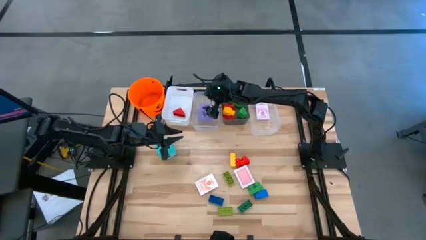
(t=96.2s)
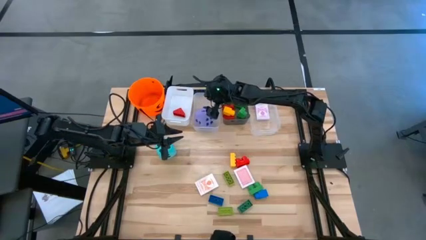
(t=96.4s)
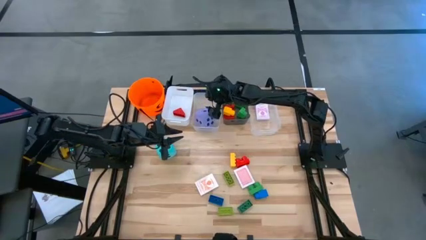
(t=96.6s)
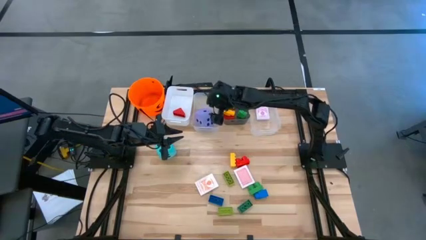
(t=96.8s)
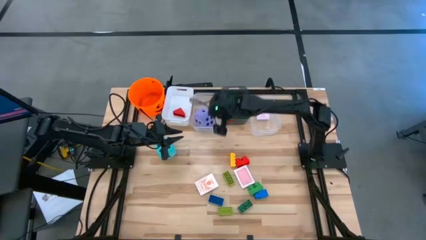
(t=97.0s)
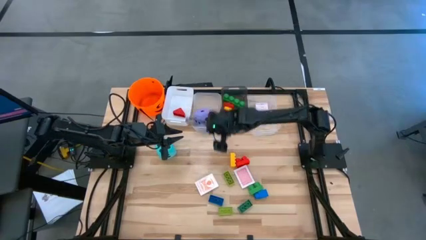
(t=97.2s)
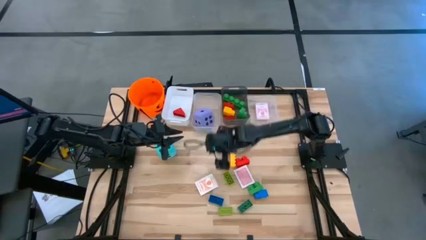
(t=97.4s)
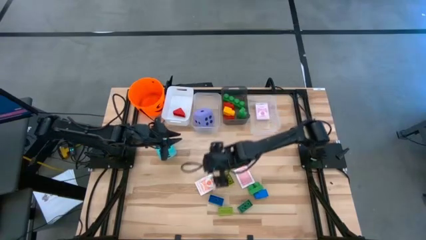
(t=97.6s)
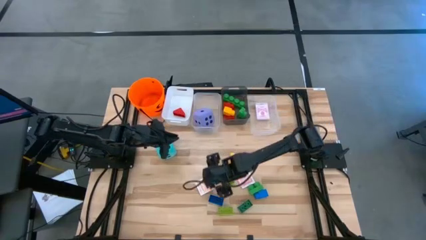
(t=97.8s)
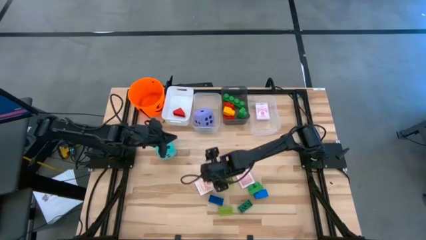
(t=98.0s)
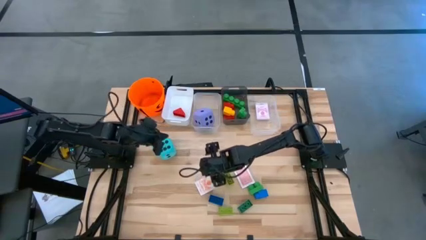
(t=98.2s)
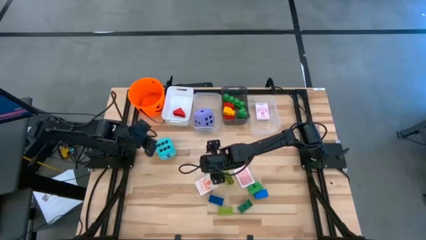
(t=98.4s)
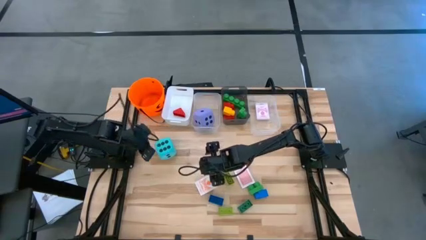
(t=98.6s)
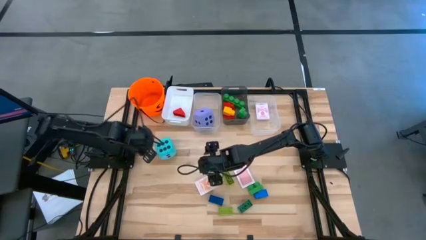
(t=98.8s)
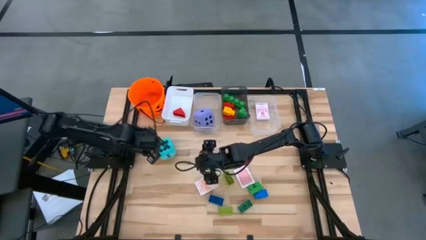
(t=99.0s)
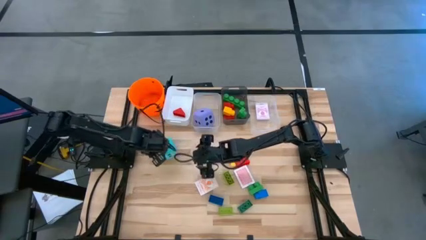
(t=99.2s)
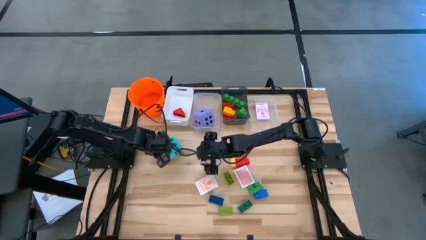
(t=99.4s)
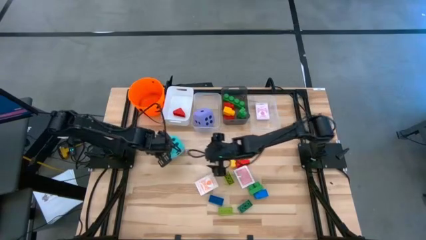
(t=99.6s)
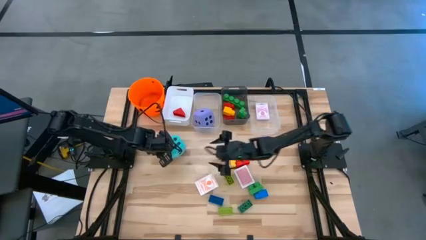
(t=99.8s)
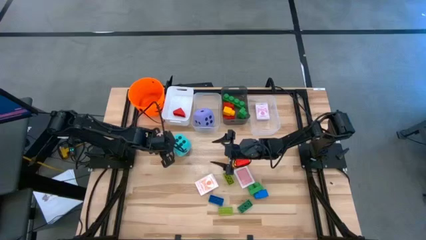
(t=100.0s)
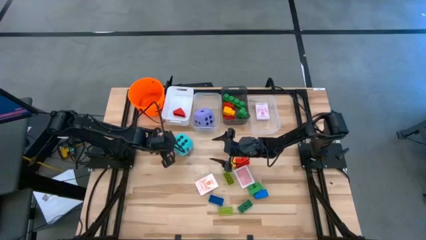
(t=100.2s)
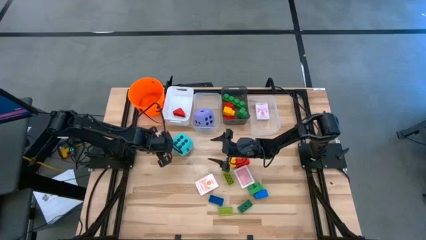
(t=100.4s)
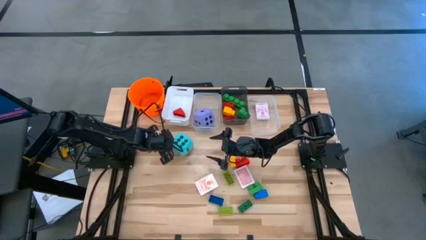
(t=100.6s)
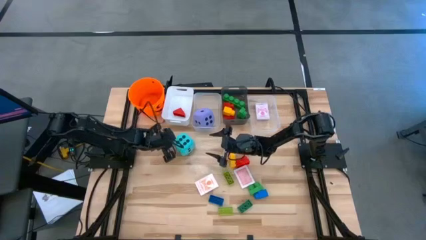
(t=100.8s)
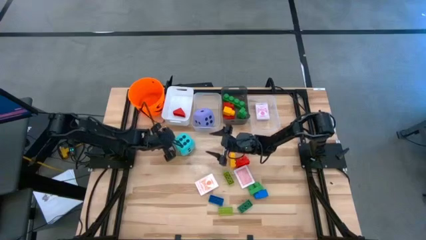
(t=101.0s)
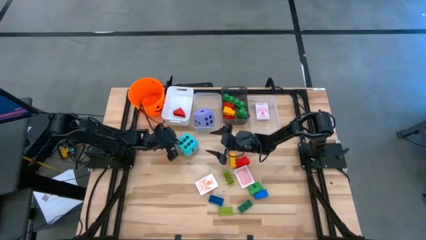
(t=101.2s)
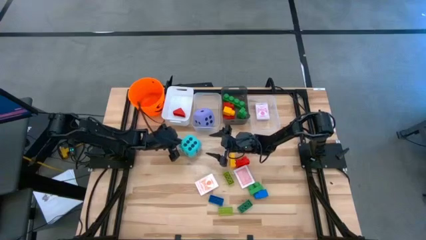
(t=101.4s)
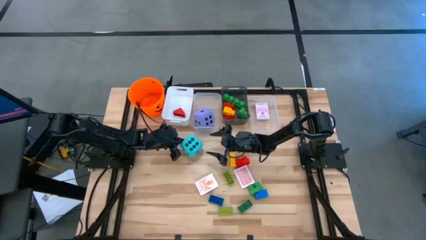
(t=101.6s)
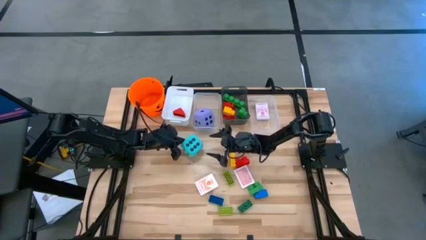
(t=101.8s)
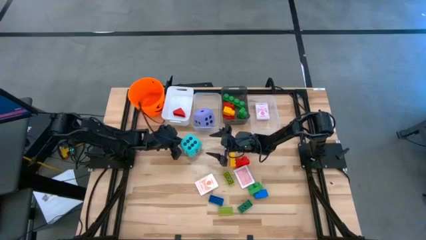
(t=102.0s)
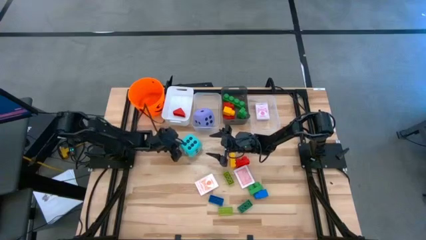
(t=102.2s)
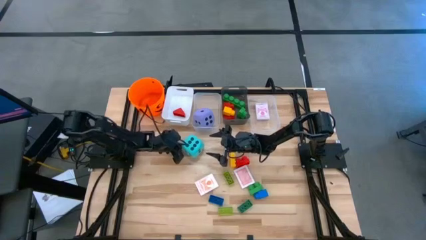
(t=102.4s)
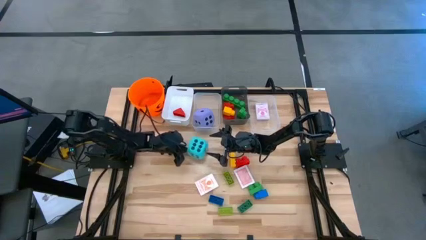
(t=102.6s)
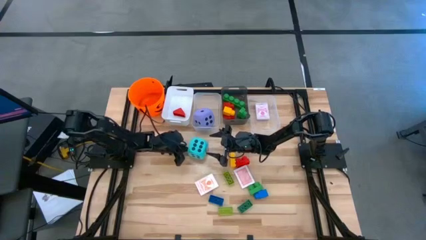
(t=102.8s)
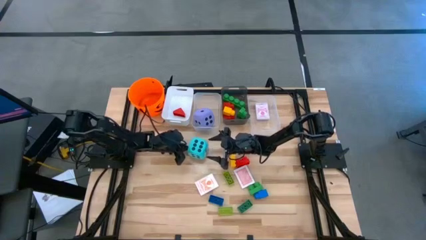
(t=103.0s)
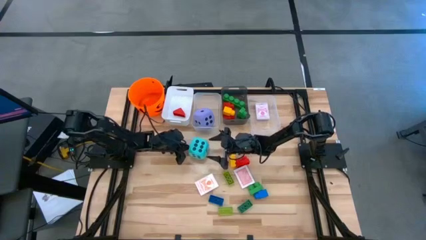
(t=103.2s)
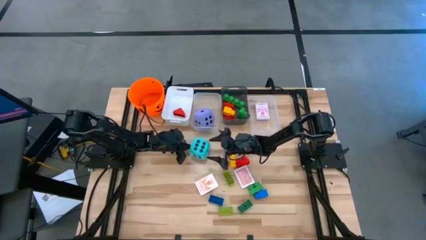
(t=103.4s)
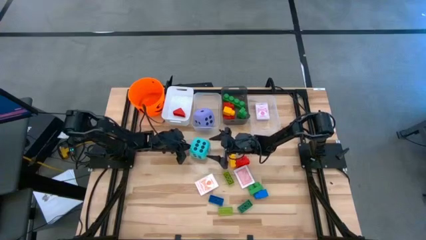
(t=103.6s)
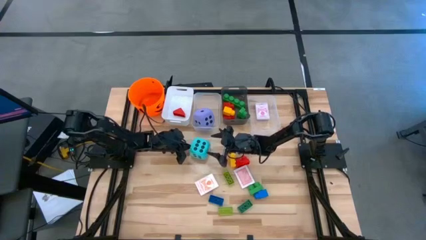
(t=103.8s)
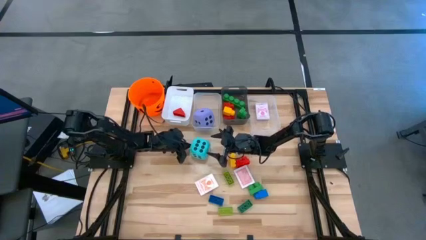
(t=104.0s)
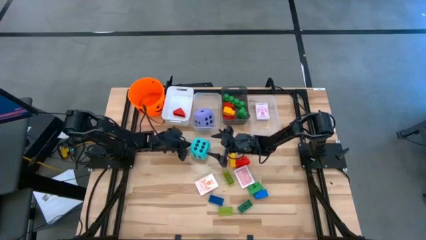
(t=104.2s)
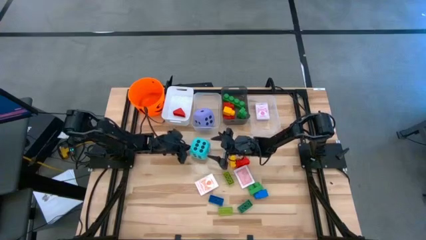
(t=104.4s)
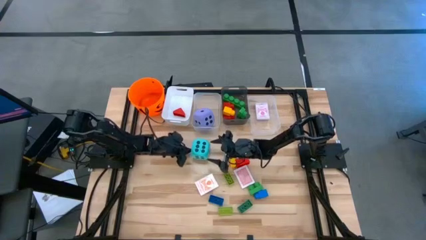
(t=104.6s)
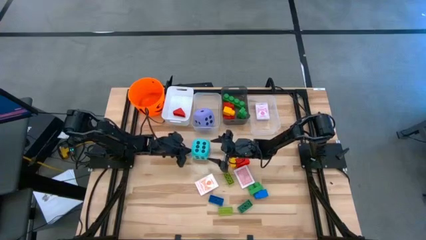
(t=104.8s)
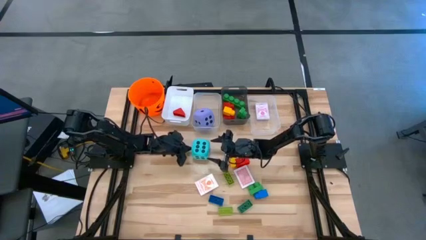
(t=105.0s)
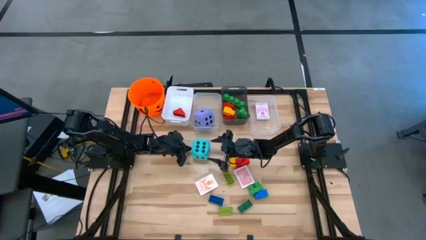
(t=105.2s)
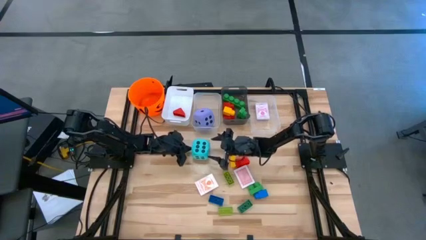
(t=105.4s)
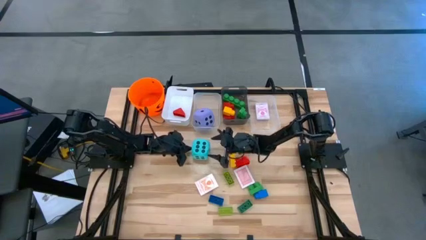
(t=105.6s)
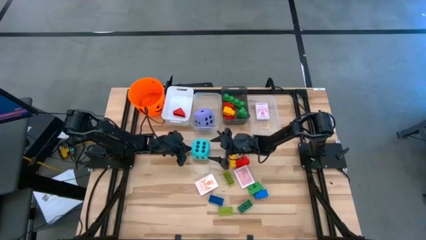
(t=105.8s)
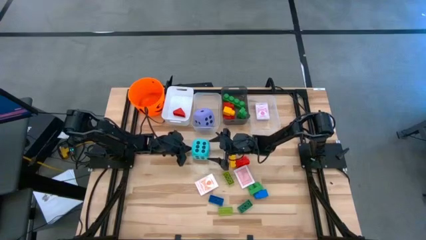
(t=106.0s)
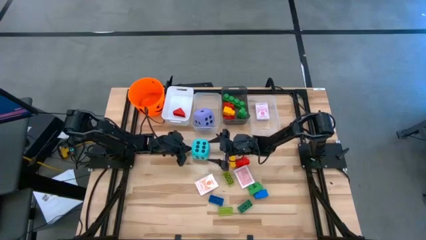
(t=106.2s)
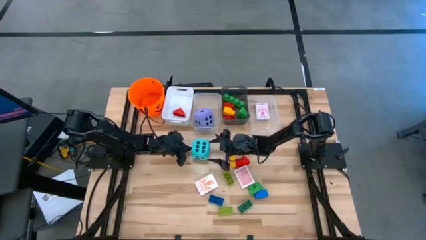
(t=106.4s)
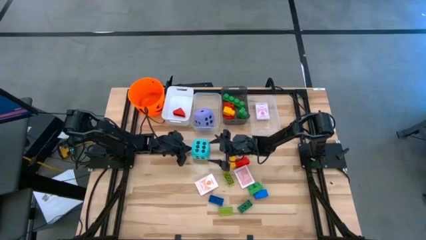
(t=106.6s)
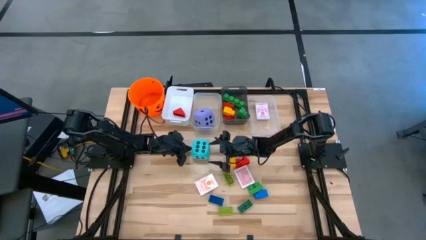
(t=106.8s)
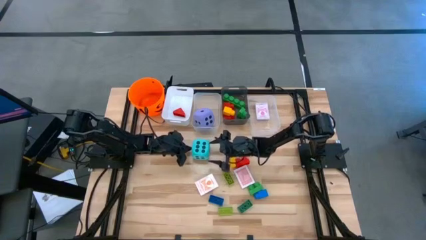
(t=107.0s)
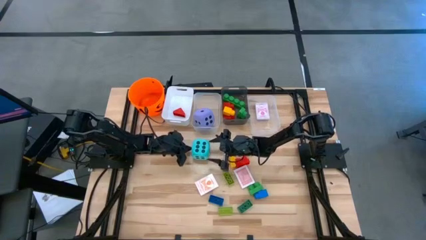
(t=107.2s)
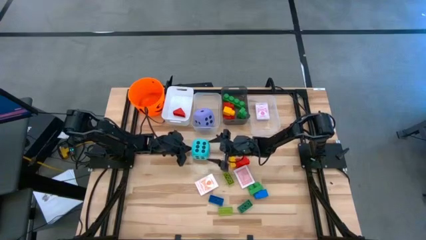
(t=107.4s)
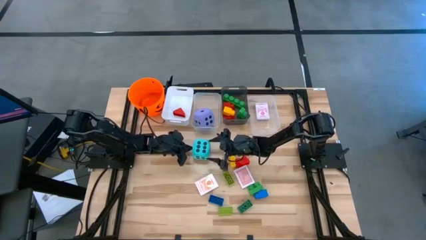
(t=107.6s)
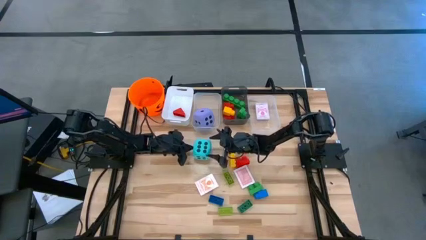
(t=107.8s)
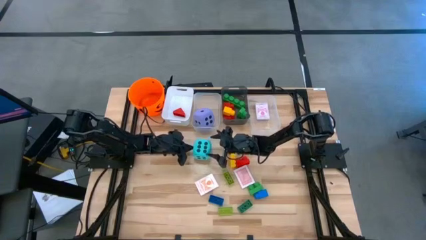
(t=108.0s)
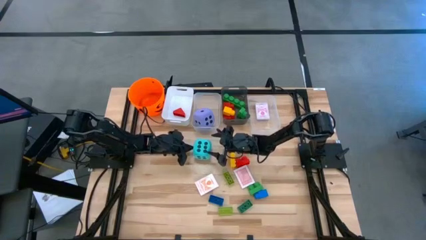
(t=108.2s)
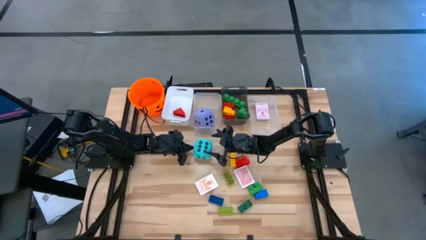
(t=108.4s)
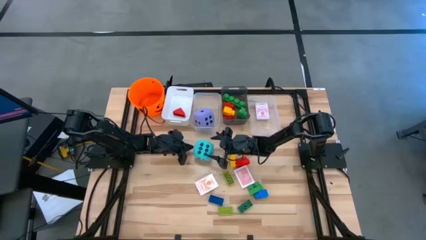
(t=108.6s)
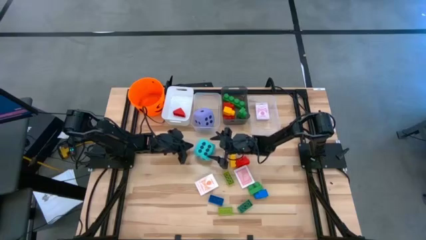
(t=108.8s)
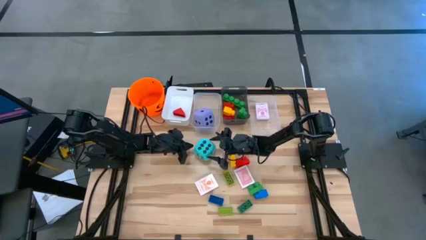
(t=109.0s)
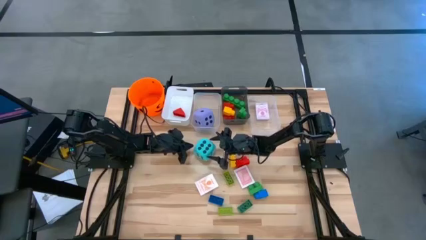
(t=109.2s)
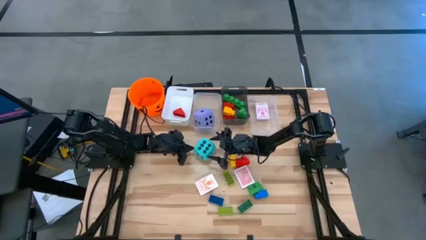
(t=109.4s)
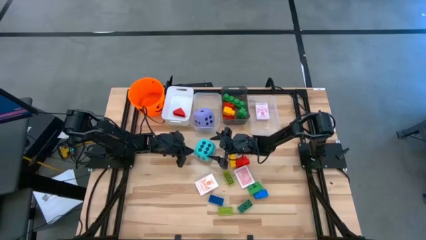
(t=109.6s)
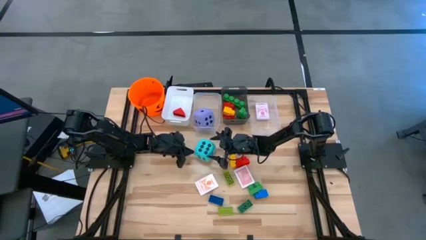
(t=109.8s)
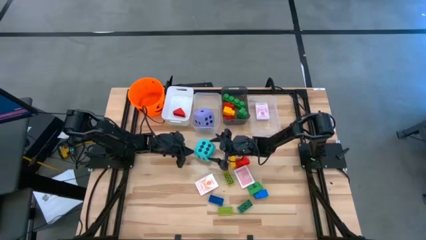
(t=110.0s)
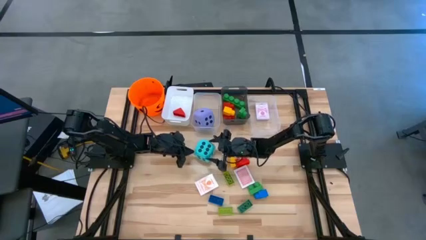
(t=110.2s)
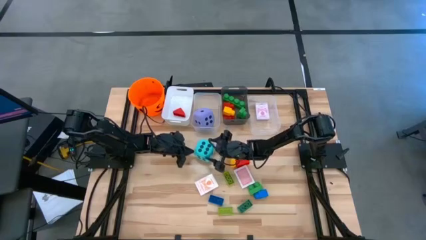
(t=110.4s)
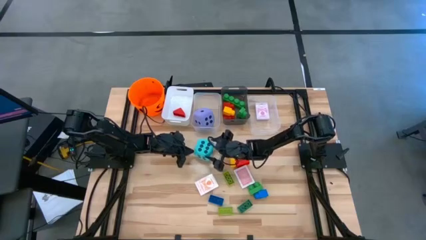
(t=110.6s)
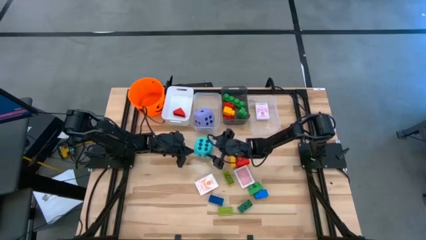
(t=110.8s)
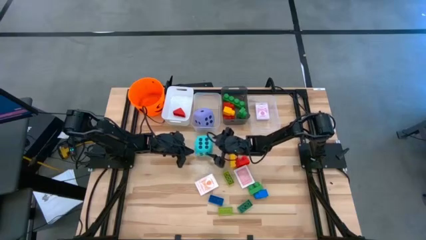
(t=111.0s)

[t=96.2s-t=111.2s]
Task: Pick & Place Toys
Put the large blue dice into the left transparent bin

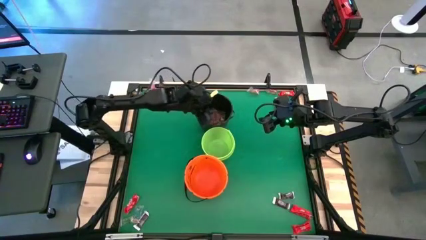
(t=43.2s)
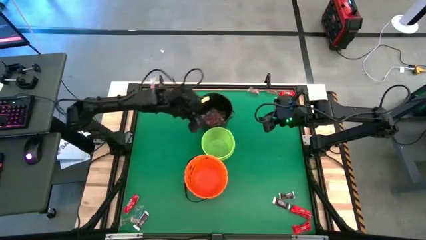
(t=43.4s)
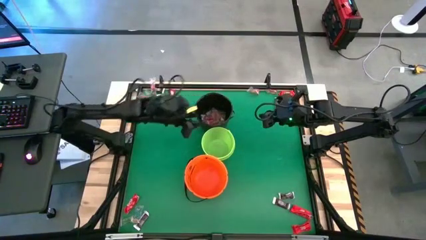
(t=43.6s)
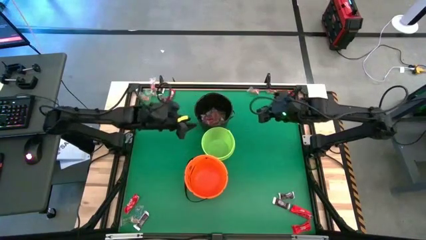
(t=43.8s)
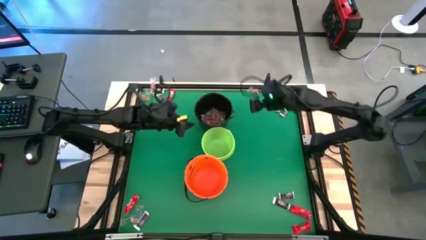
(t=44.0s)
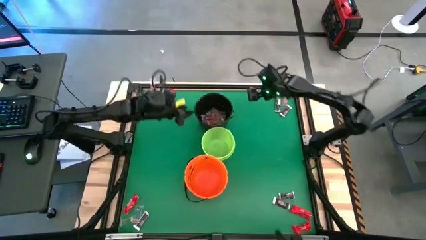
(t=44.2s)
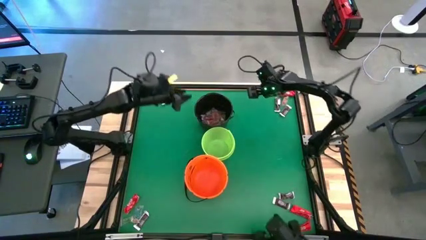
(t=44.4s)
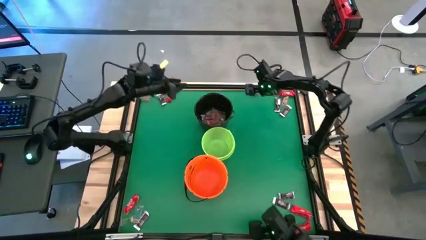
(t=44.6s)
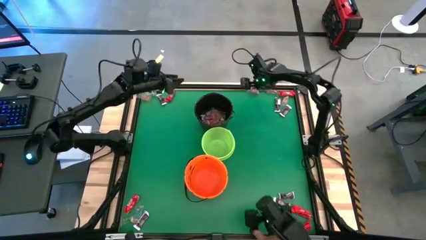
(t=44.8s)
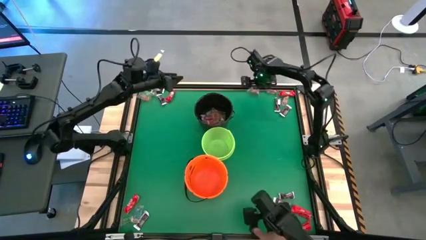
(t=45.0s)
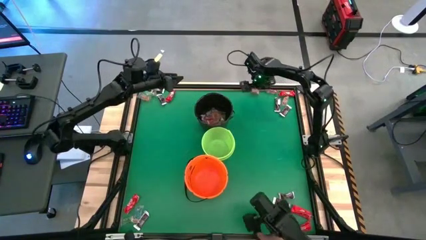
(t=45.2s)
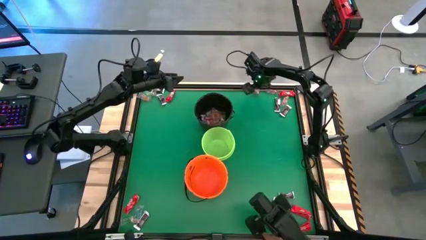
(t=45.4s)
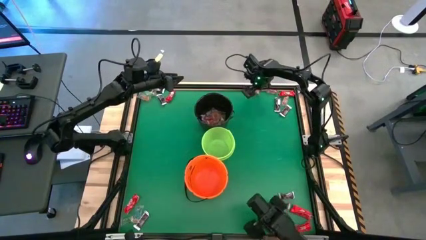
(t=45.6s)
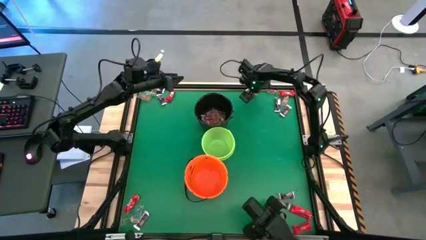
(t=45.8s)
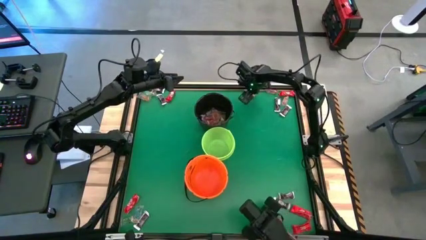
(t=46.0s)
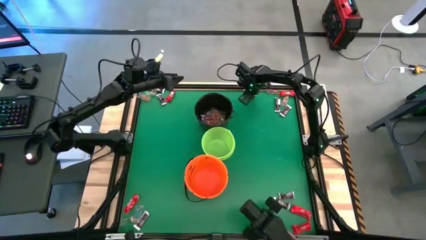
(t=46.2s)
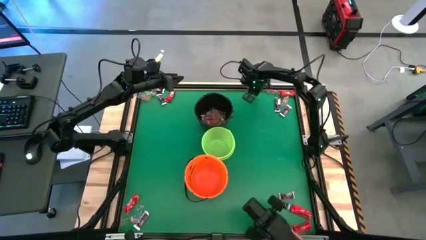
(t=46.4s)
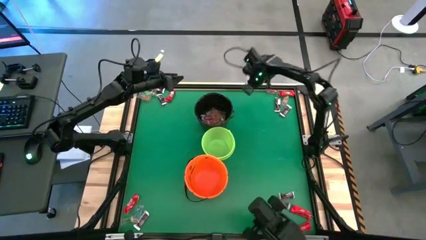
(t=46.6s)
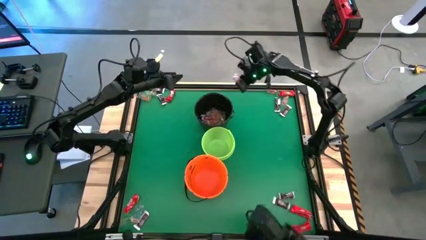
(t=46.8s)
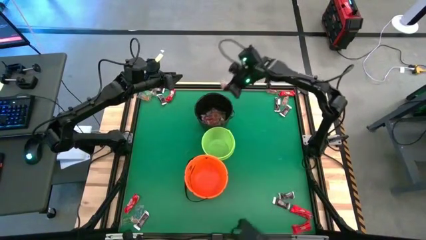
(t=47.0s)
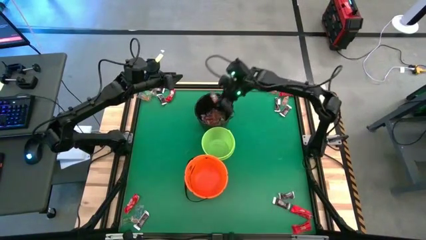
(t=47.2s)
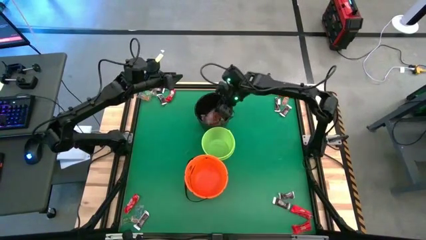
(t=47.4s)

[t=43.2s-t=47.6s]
Task: Sort candy by brand, put in halloween buckets
Put the orange gummy into the black bucket
